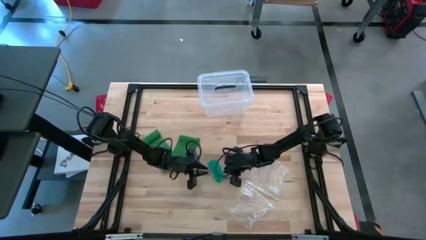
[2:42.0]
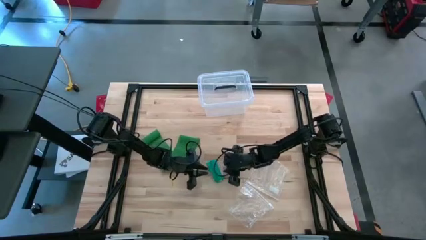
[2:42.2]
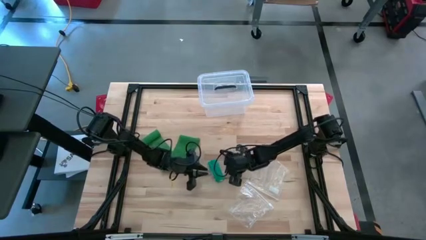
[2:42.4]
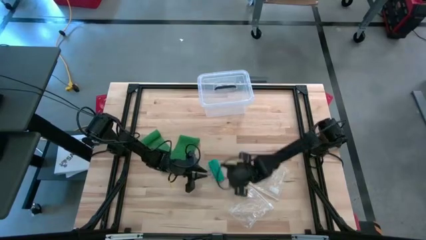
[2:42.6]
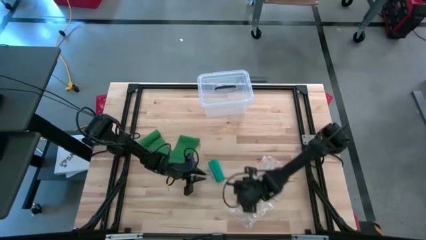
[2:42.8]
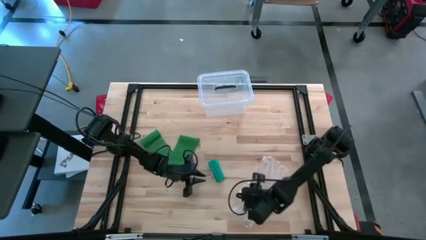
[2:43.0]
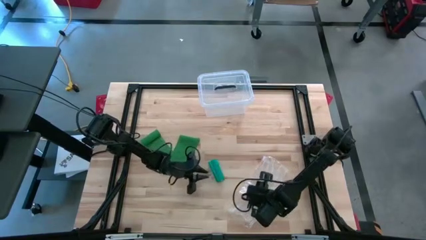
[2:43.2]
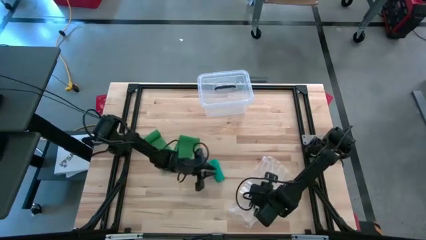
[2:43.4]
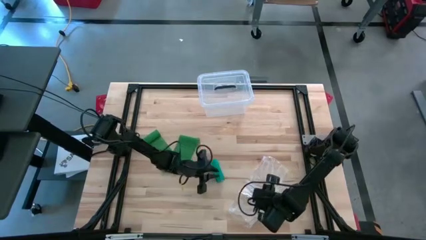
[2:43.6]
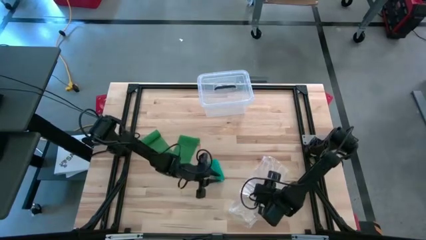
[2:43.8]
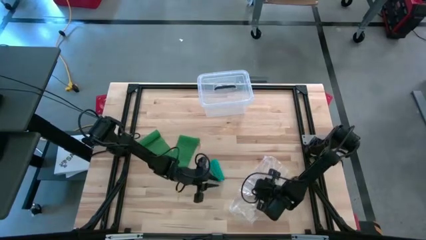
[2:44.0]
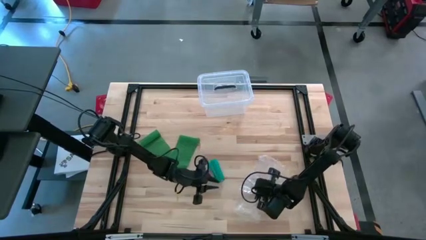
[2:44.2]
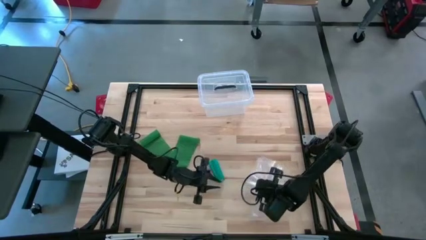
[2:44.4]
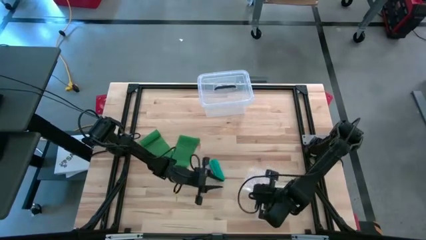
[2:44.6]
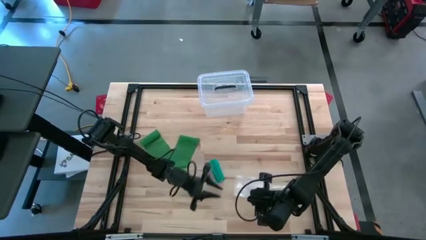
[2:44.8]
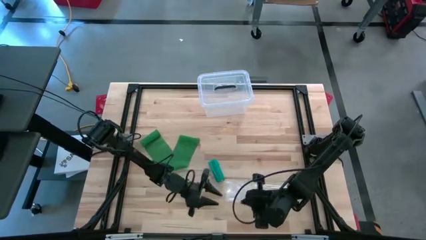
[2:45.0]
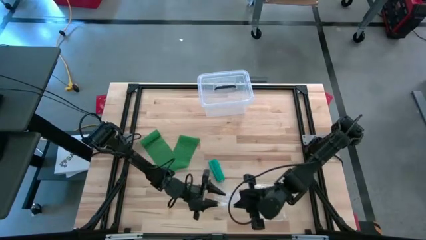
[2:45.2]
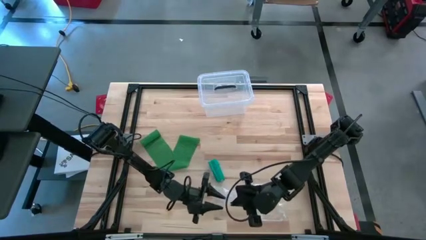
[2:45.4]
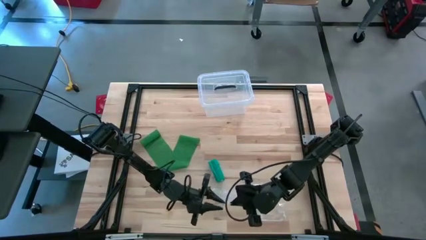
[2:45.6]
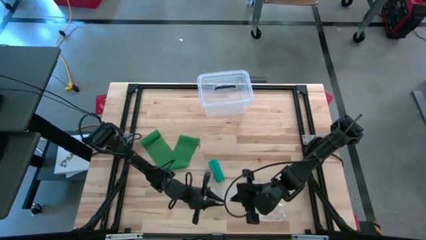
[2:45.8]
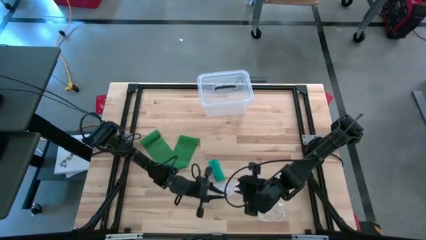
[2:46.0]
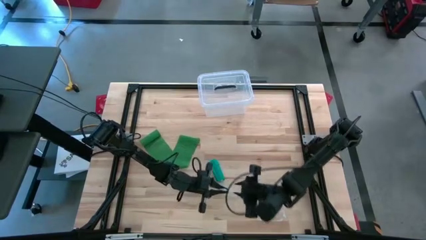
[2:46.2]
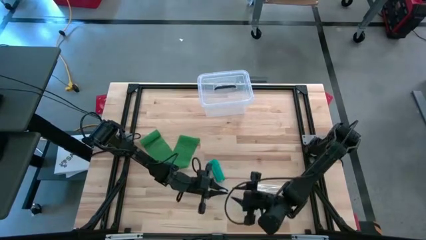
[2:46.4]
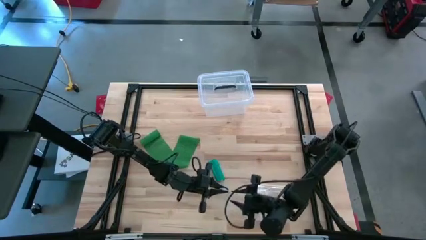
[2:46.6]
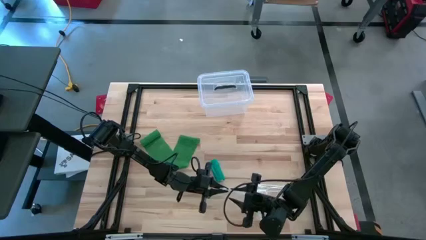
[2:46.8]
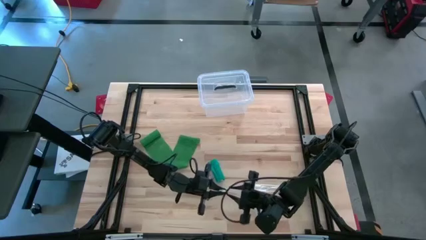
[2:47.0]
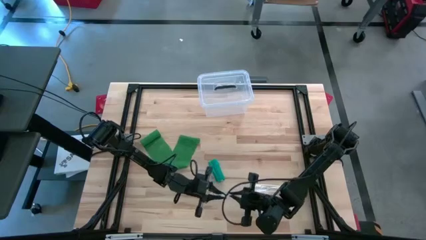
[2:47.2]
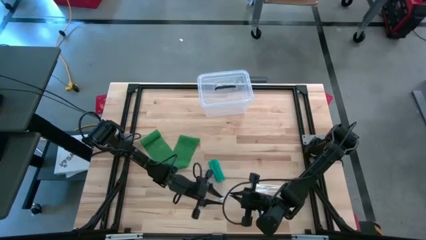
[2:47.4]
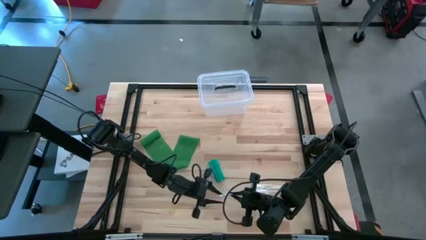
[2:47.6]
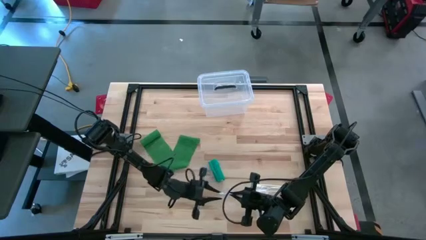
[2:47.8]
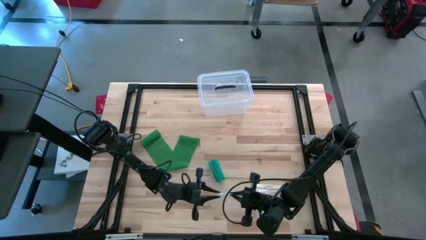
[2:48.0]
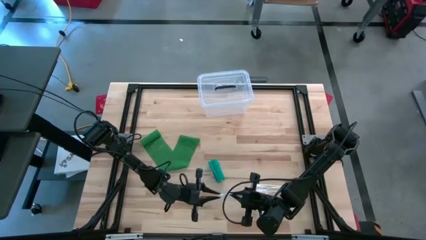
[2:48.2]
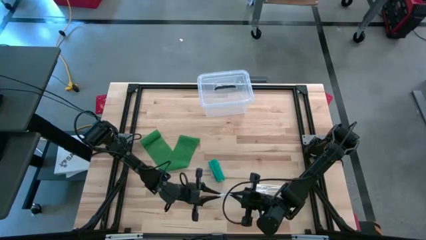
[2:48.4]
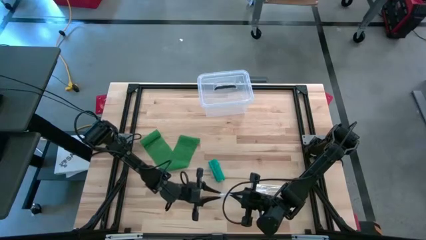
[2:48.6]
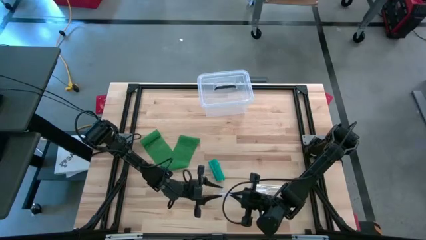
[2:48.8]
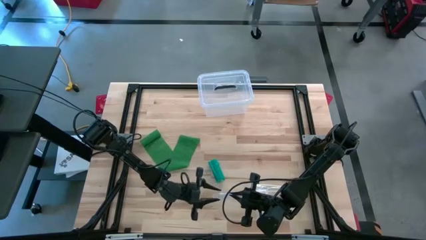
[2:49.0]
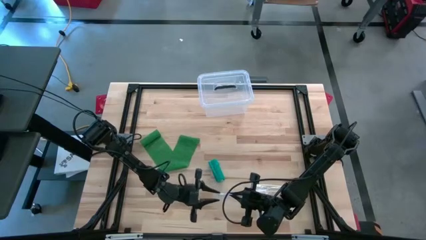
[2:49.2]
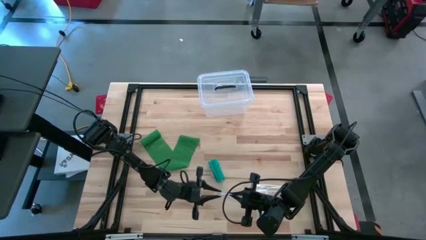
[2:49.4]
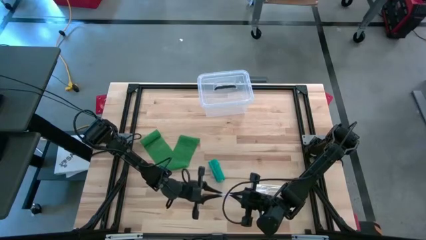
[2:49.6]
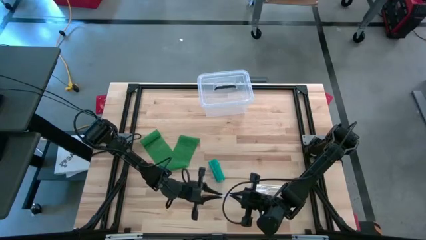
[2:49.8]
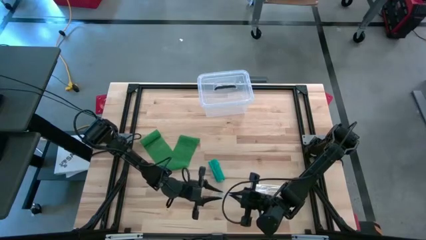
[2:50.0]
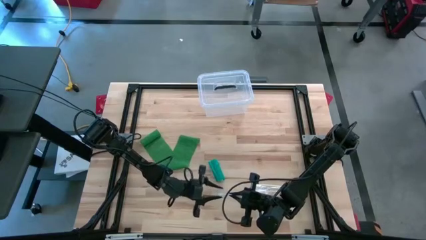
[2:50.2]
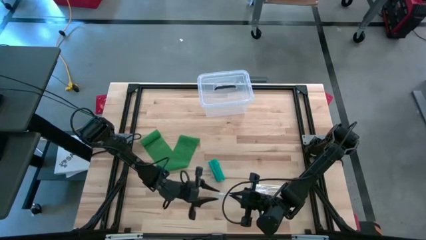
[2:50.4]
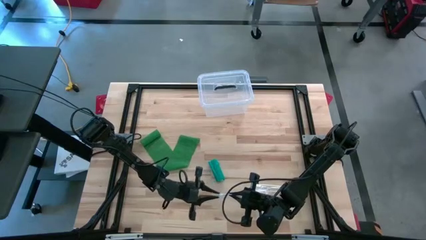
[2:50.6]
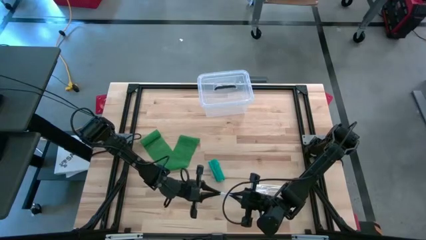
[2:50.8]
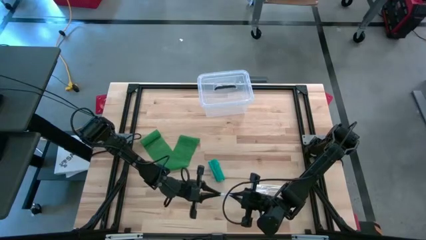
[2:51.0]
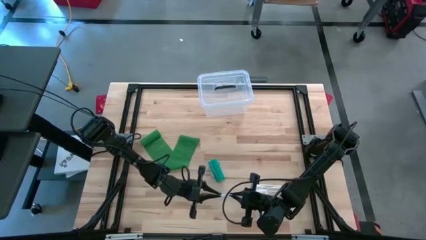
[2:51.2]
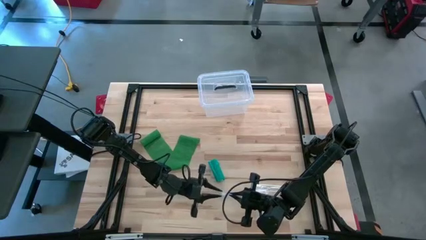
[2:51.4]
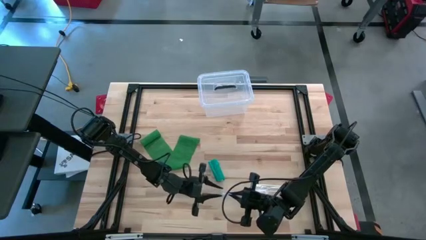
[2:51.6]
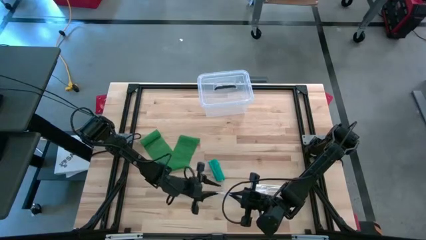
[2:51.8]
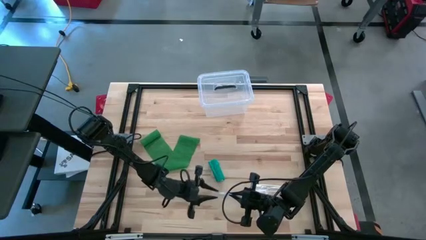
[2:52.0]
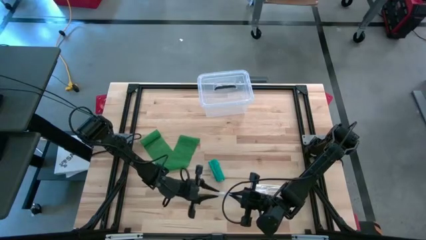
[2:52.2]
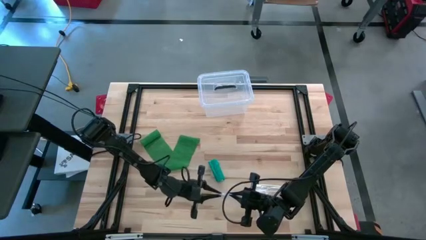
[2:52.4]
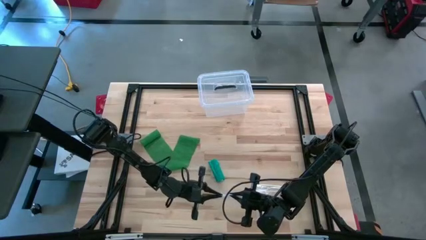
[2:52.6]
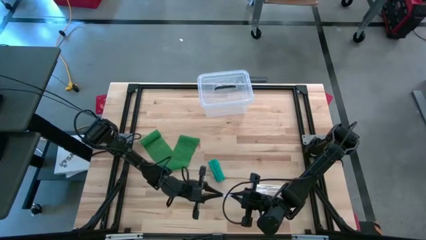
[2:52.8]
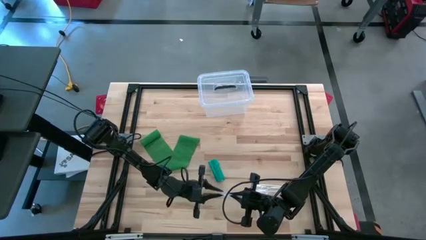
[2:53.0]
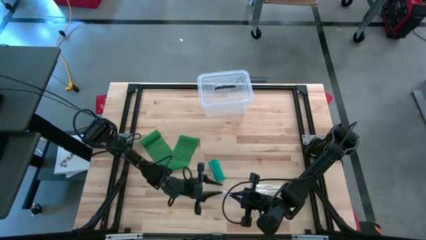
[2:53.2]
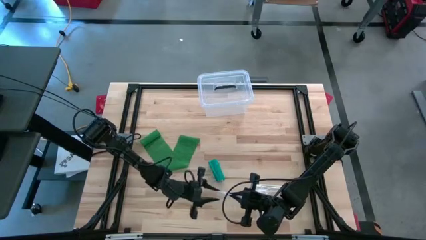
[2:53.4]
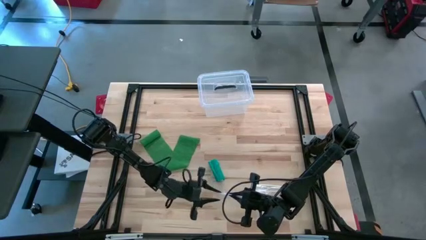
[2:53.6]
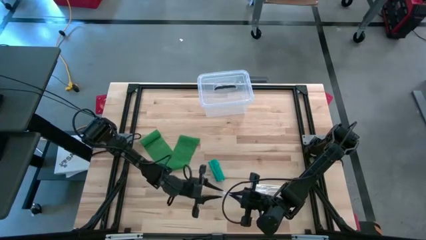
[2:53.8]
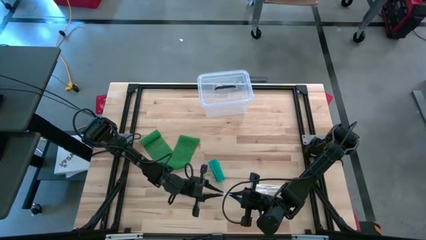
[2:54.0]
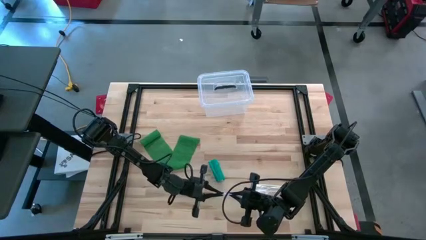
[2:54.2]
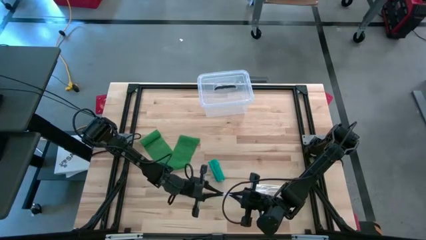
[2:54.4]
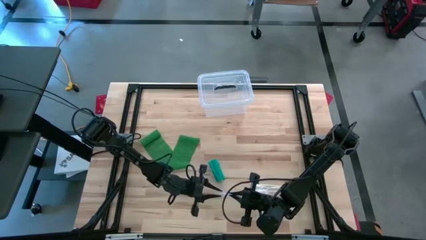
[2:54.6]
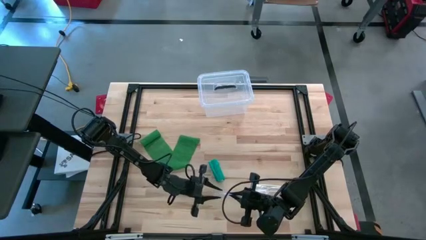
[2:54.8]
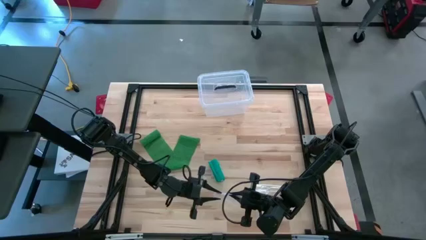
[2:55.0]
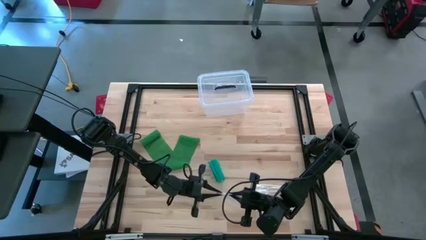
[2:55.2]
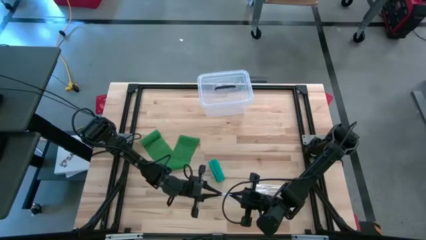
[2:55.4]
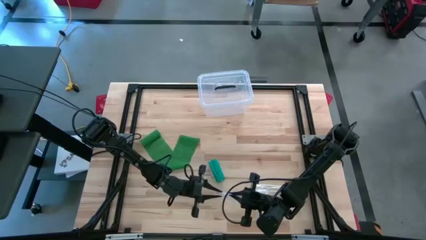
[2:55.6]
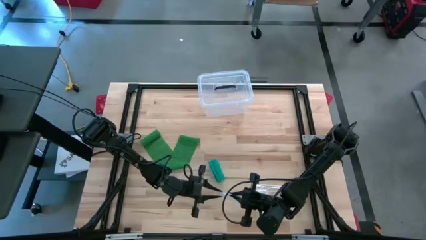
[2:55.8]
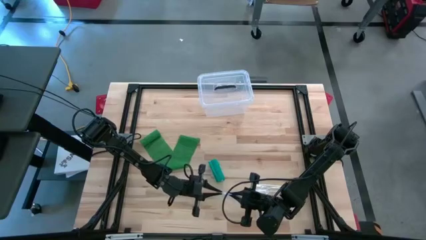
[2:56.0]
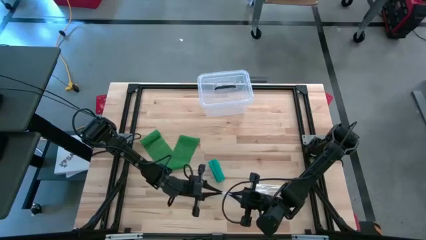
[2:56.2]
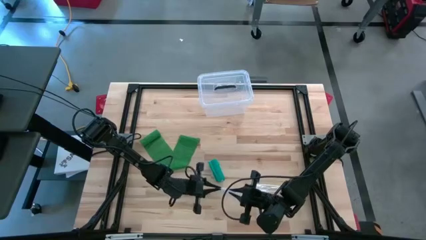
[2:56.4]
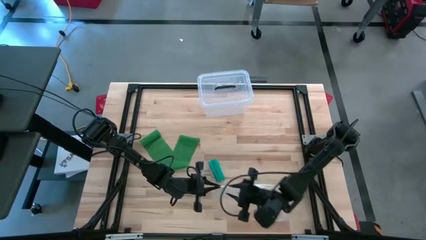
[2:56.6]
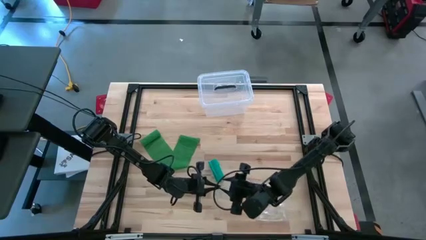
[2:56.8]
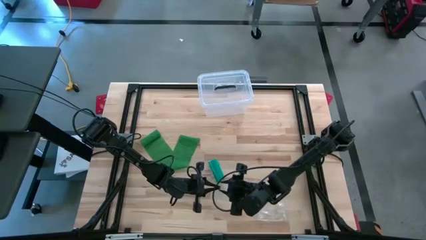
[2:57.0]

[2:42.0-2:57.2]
Task: Roll bandage
Open the transparent zip bag

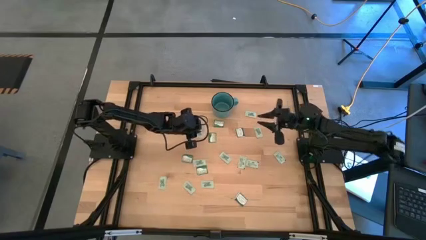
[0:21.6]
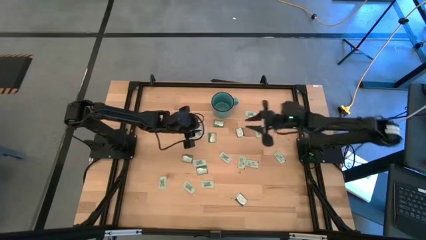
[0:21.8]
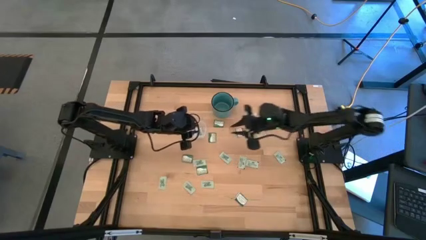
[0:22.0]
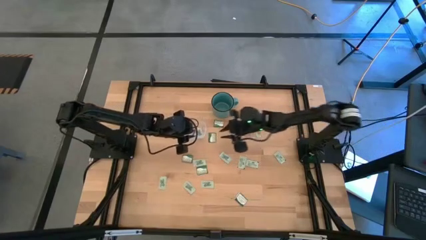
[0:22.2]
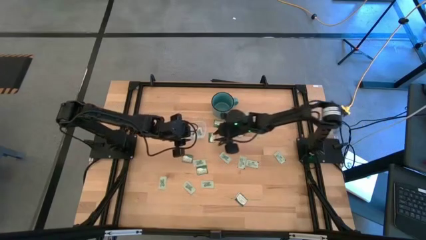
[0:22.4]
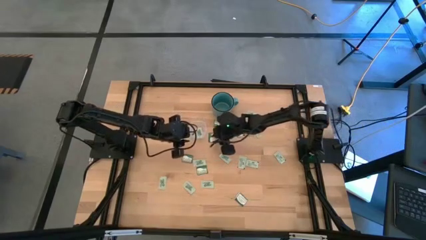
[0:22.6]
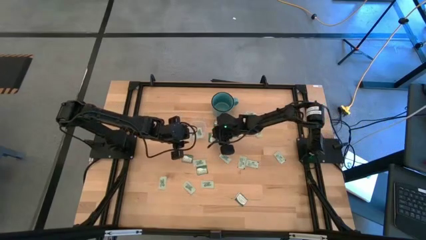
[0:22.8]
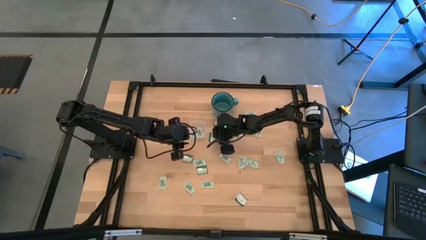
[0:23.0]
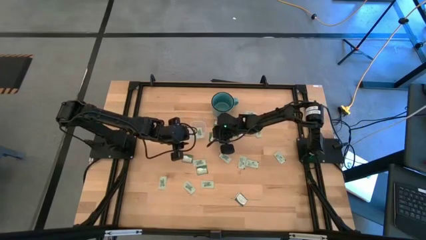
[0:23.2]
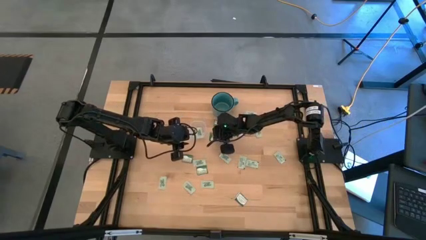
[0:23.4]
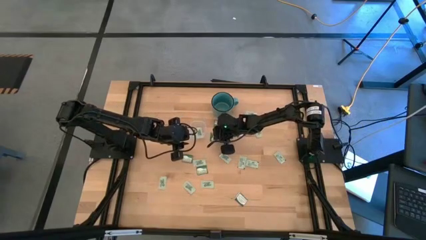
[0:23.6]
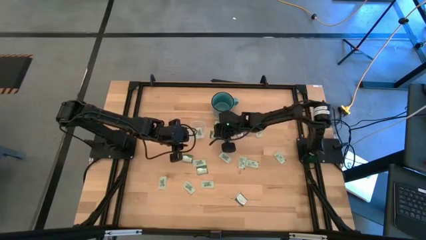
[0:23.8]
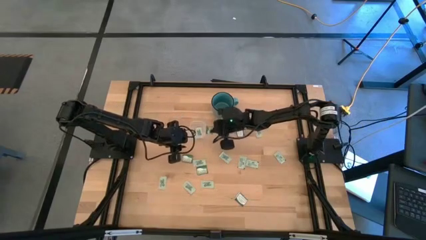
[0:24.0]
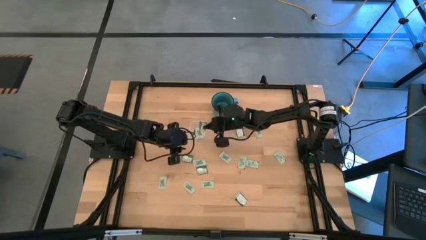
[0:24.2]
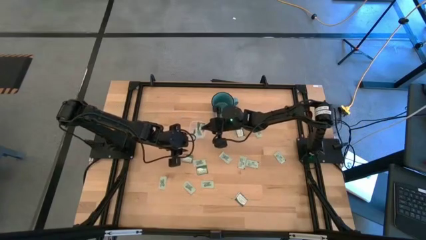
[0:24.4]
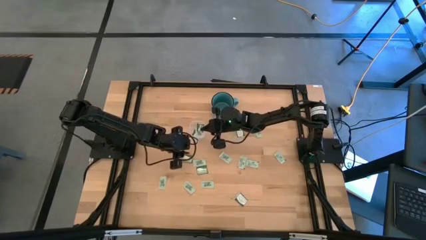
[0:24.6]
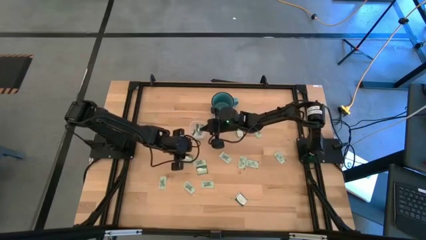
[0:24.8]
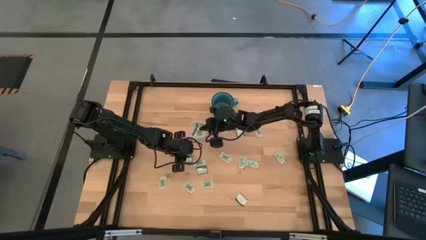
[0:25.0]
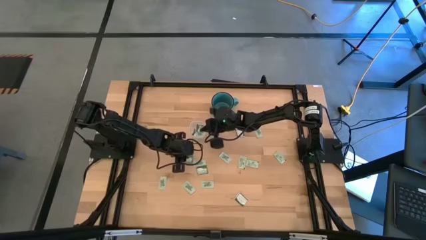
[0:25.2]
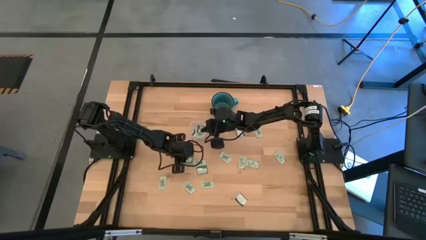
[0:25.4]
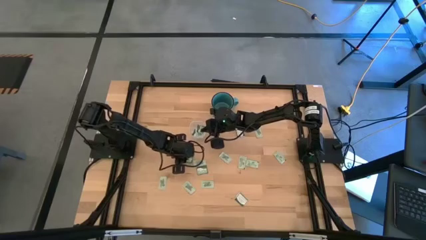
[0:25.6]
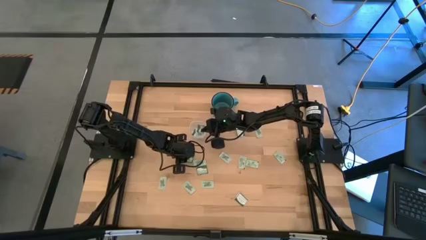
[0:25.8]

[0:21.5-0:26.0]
Task: Pick and place Stevia / Truvia into bins
Put the dark green truvia packet into the transparent container
